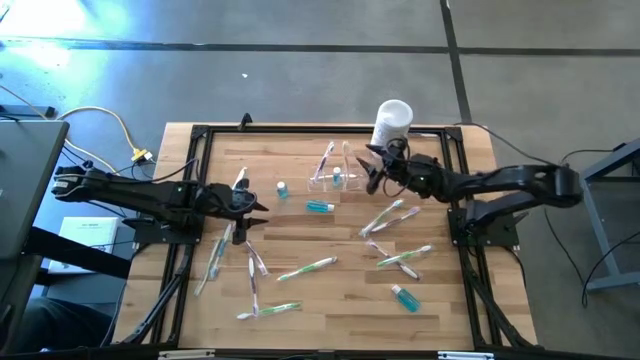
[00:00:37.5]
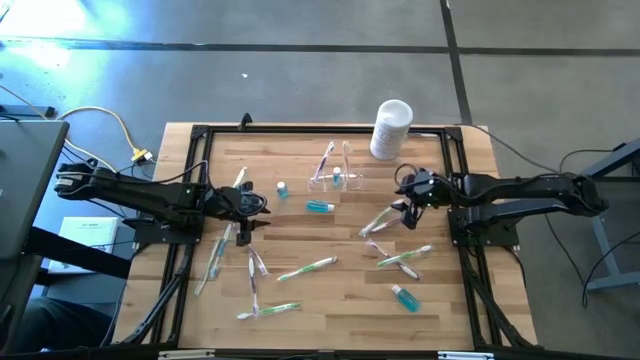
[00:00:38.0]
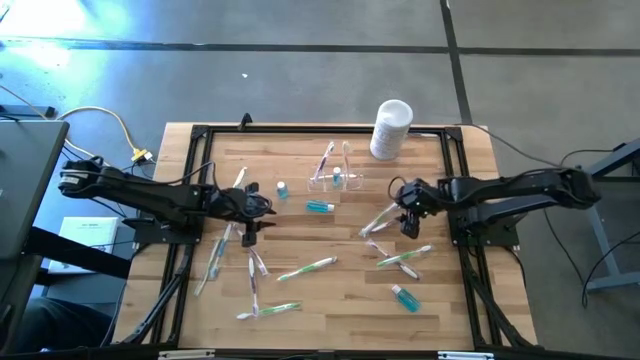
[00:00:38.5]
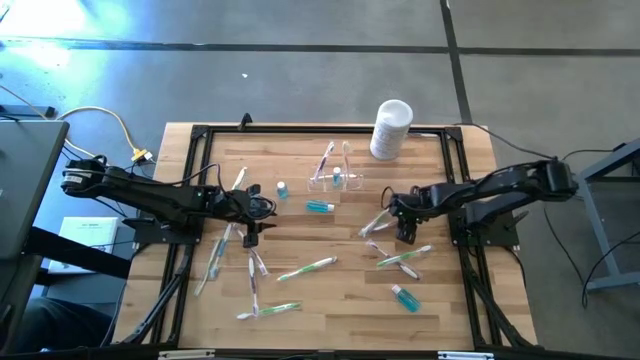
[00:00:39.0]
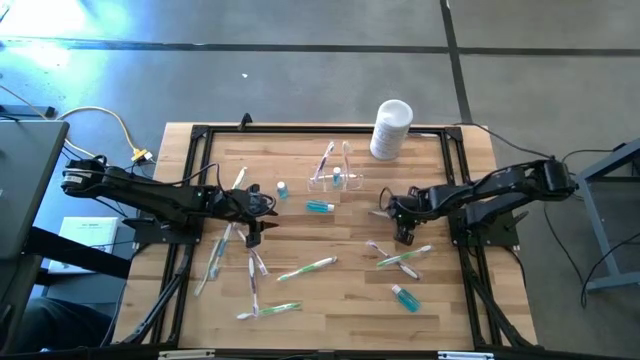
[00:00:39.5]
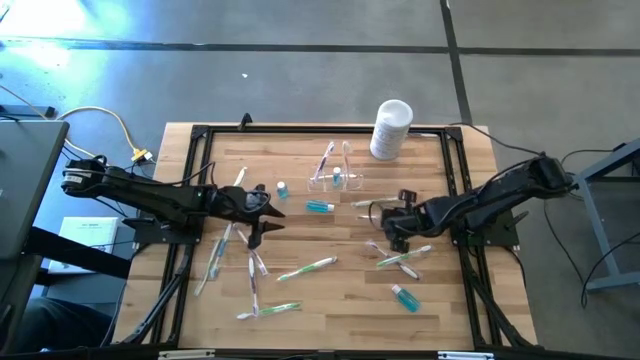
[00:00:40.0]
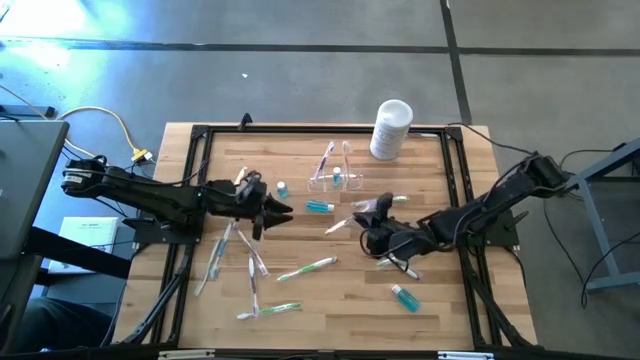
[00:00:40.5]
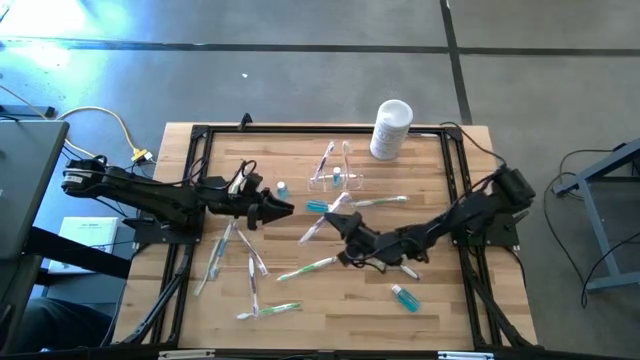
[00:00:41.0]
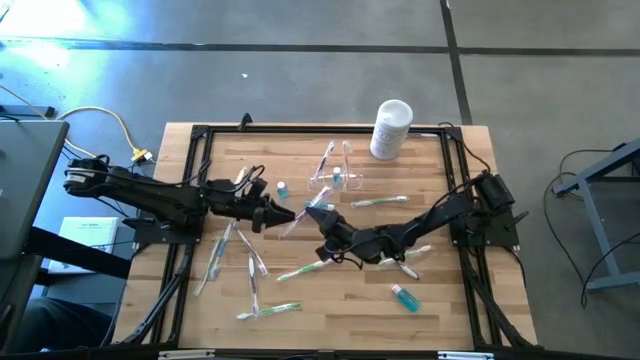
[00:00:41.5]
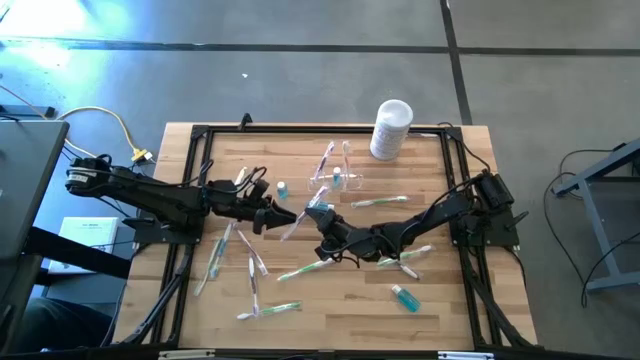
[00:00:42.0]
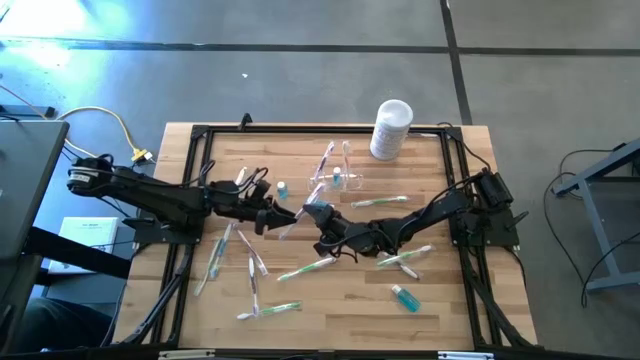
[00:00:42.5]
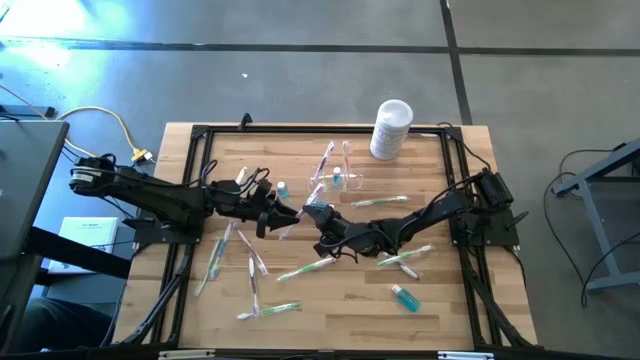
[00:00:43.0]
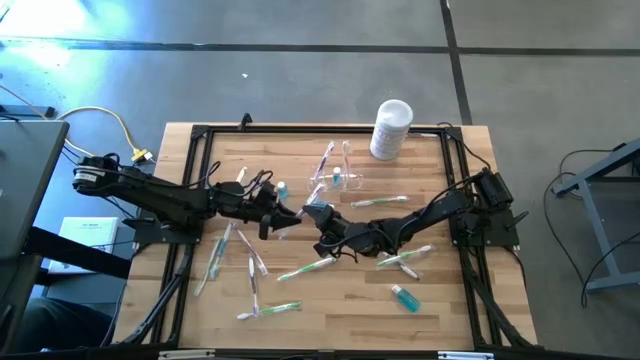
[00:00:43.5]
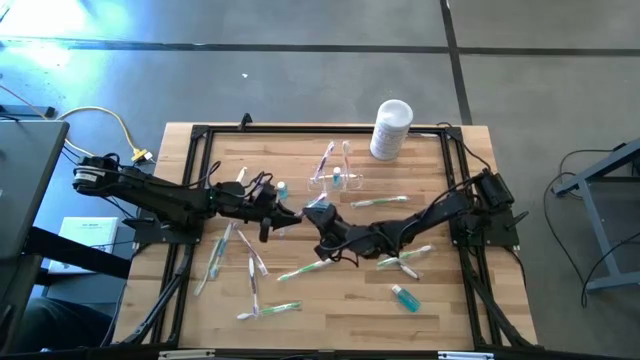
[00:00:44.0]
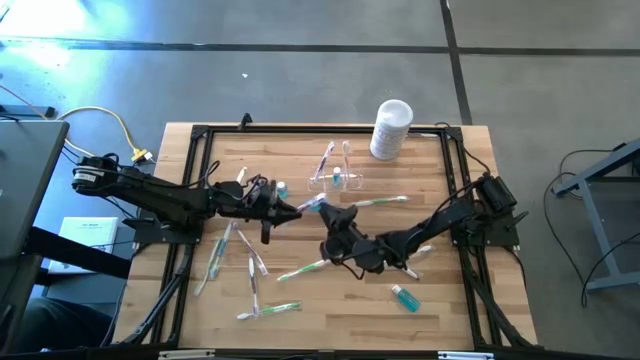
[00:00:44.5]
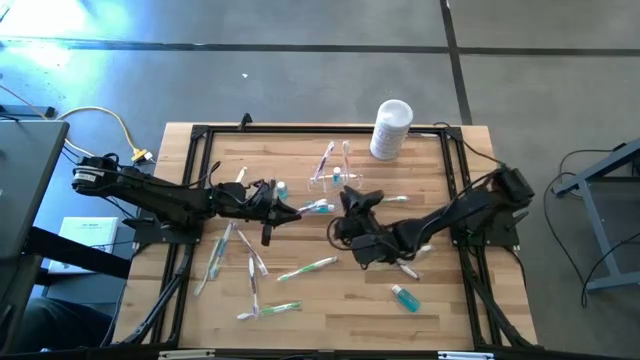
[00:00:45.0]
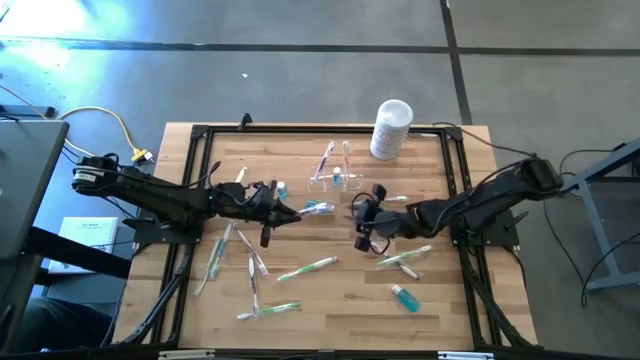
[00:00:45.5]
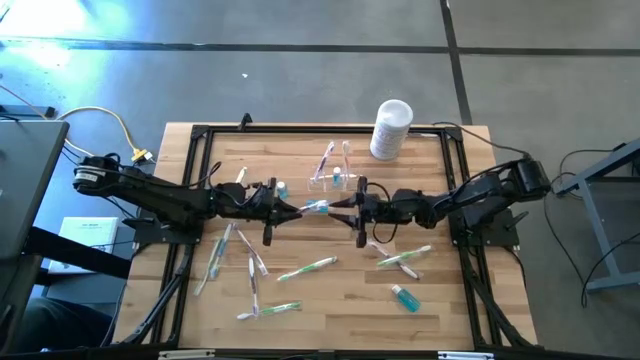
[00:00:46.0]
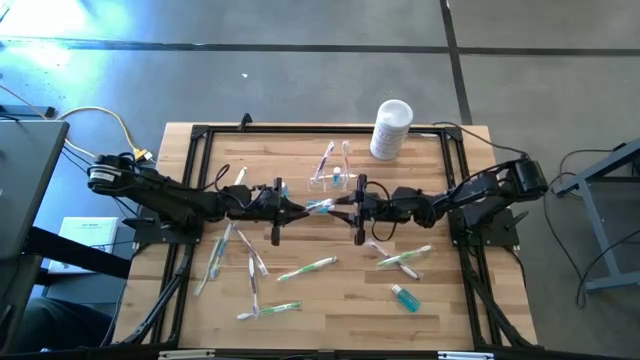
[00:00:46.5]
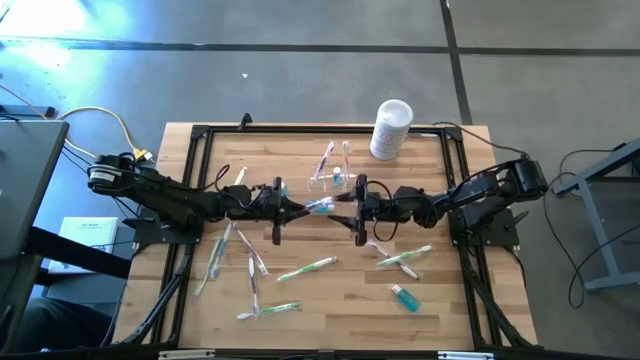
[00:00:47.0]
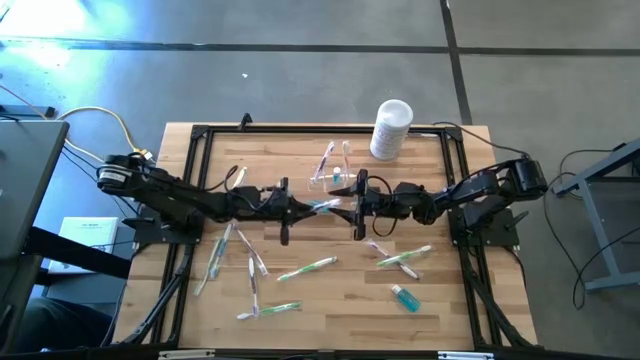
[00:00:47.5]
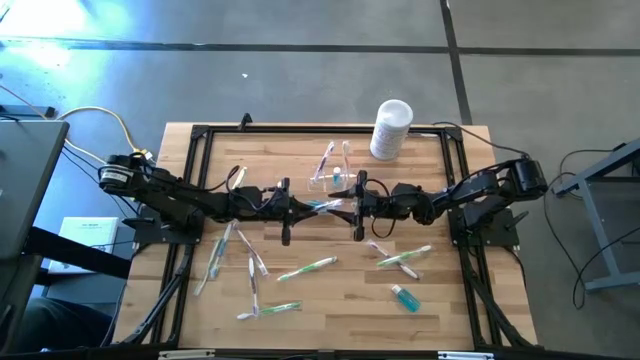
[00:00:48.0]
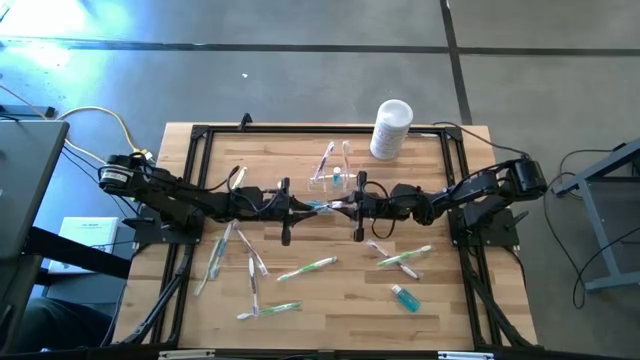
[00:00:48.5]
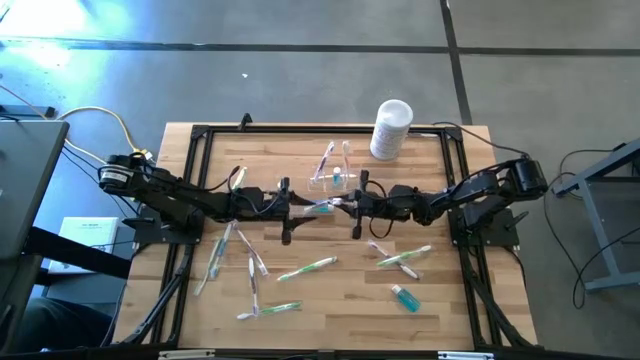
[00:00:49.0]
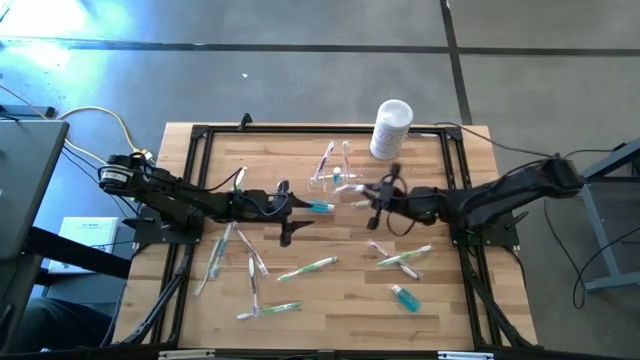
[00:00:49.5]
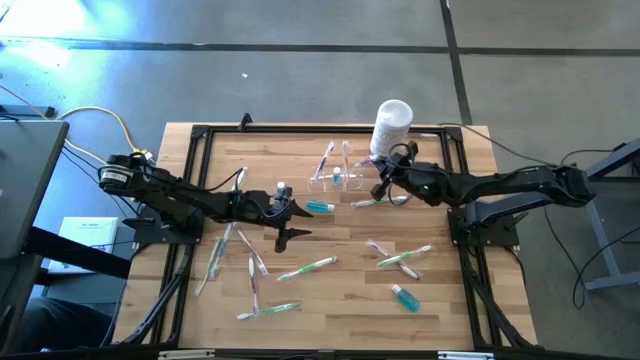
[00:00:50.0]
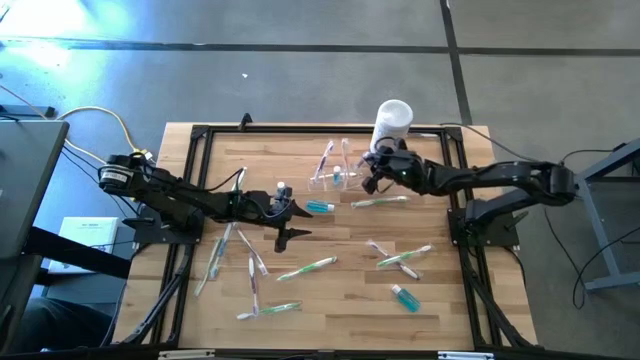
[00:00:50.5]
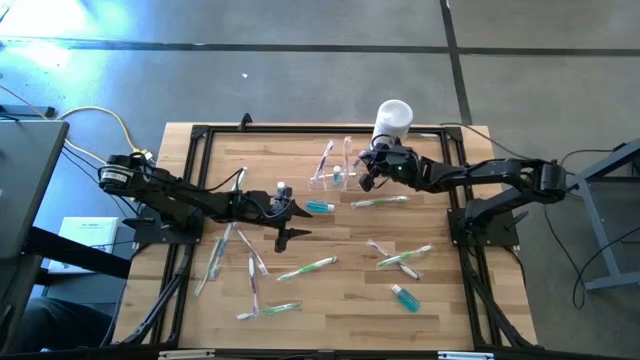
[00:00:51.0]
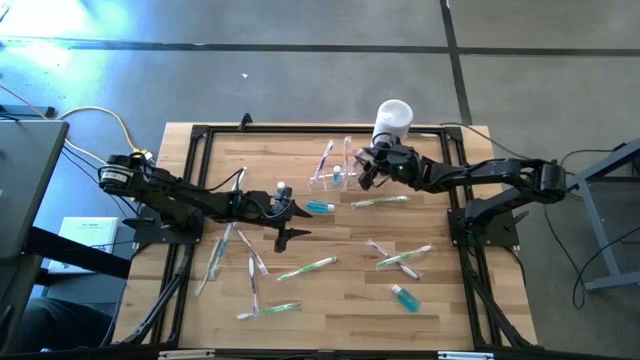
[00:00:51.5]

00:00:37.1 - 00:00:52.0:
Task: Pick & Place toothbrushing station
Put the purple toothbrush into the transparent organizer

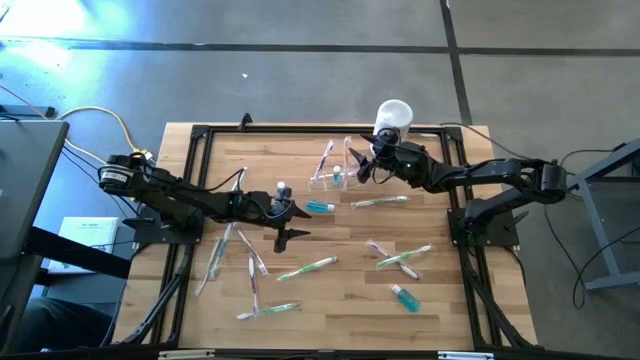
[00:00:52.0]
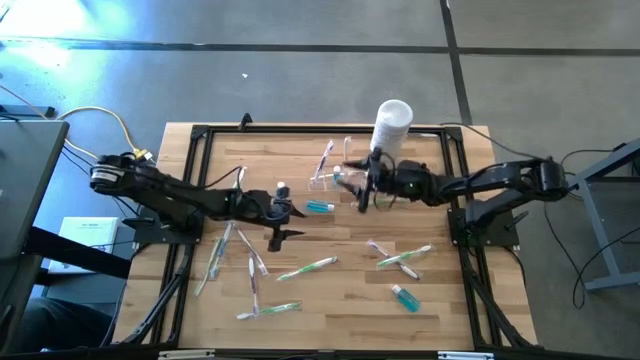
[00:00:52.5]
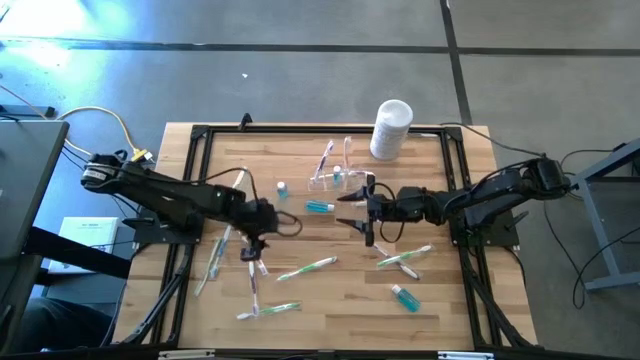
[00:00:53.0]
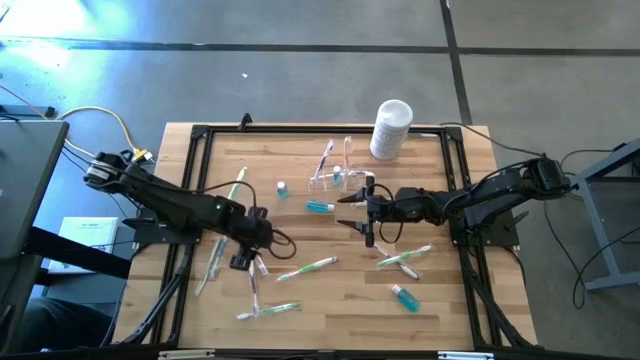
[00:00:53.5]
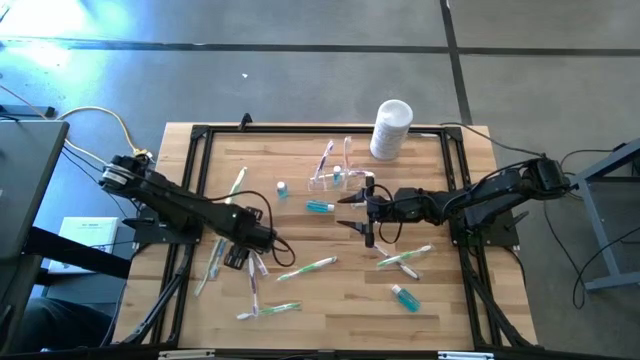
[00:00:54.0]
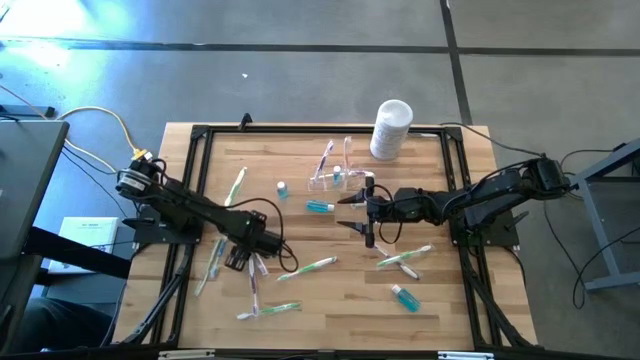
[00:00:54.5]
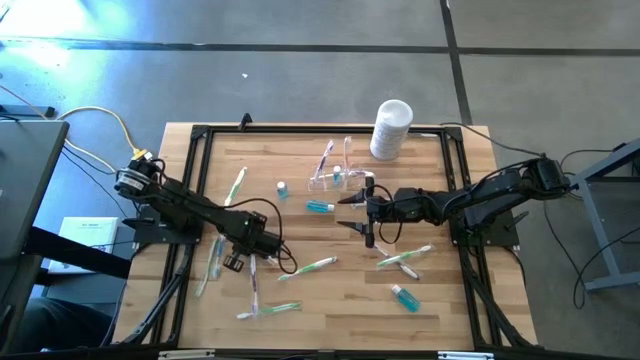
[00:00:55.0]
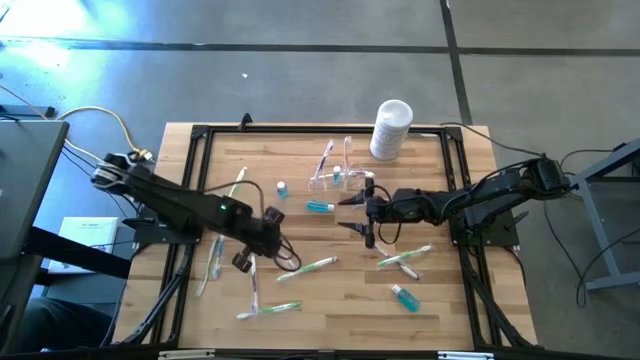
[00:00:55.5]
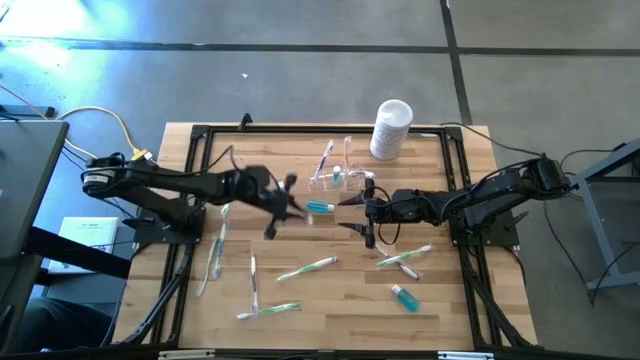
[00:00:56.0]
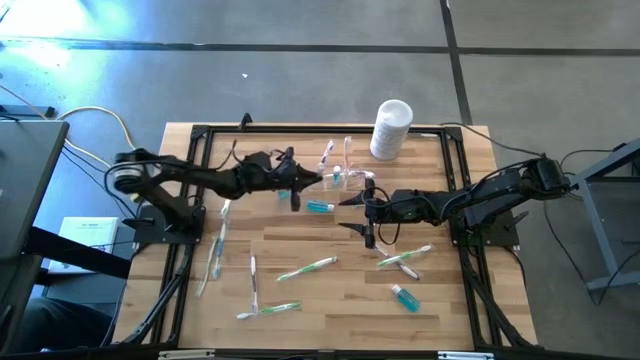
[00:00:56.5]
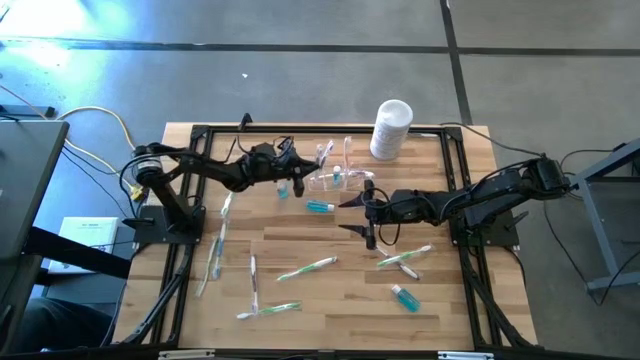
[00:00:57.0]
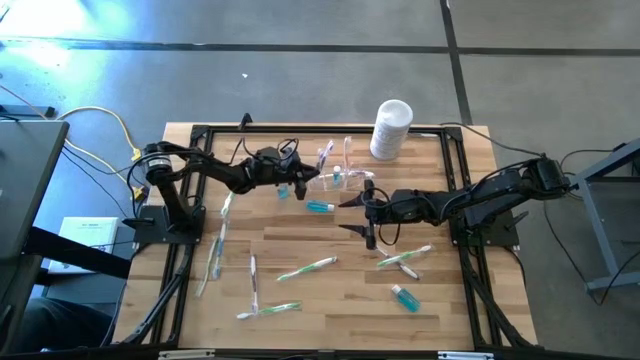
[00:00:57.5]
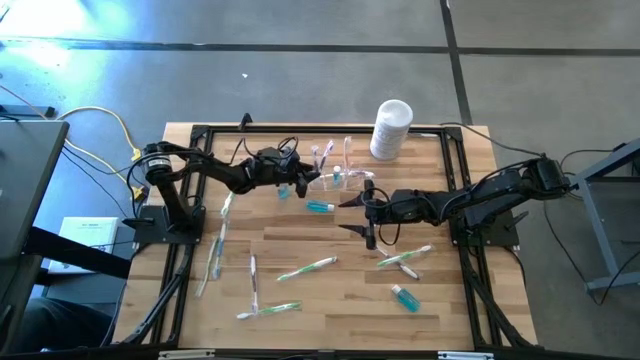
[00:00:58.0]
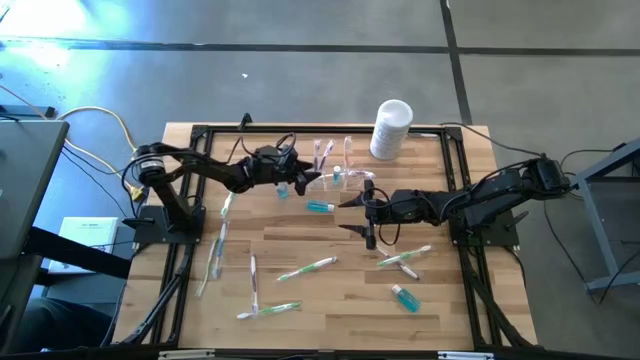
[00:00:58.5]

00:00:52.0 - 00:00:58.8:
Put the top left purple toothbrush into the transparent organizer
